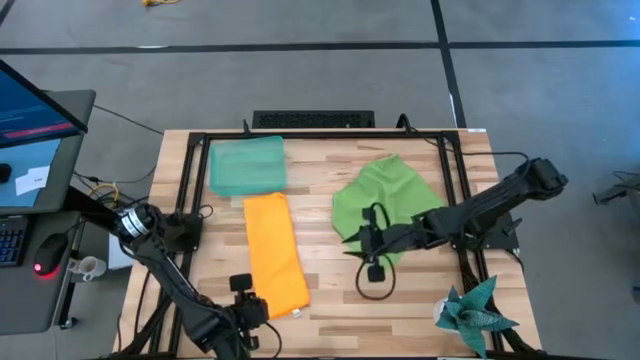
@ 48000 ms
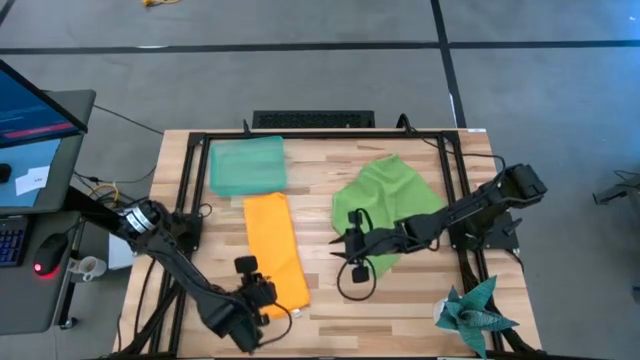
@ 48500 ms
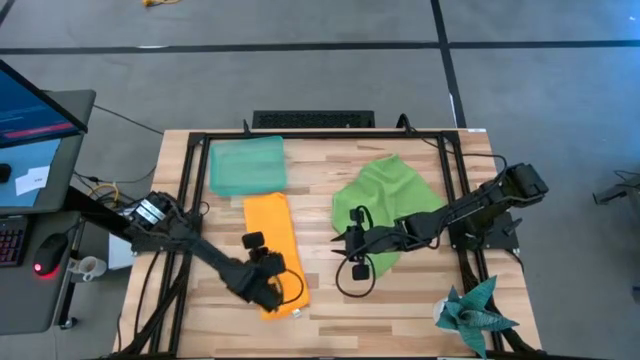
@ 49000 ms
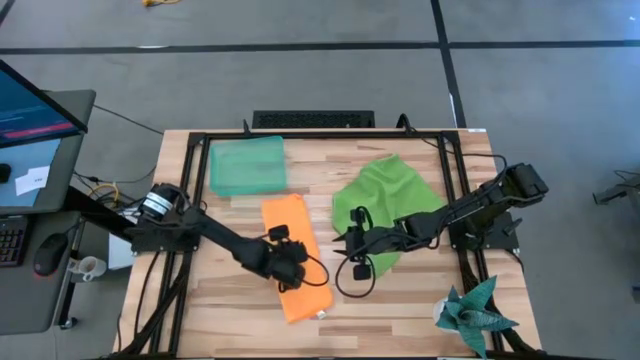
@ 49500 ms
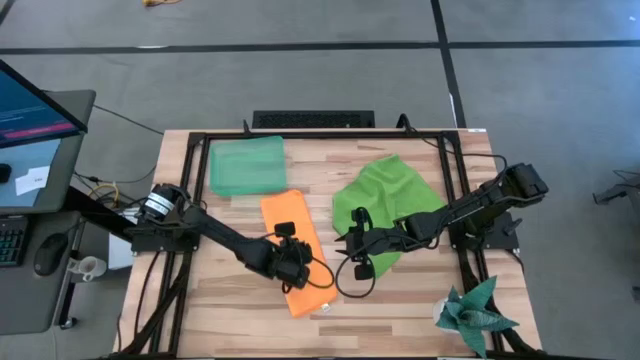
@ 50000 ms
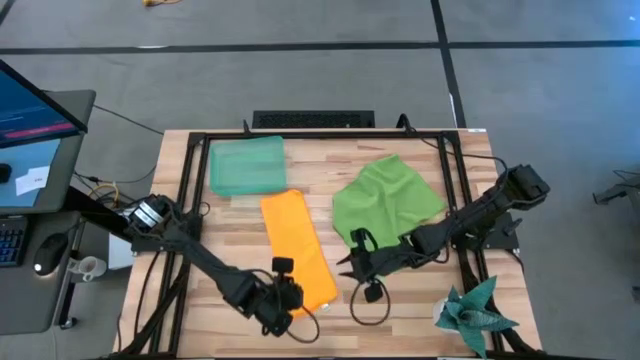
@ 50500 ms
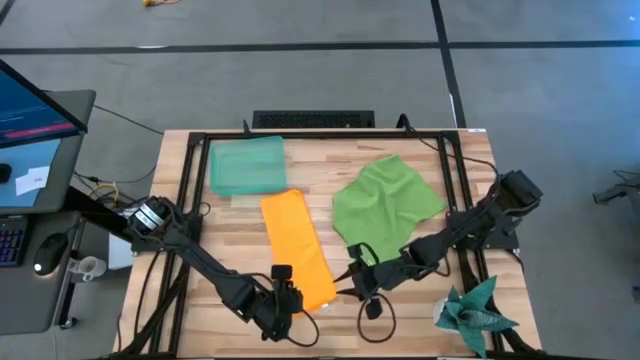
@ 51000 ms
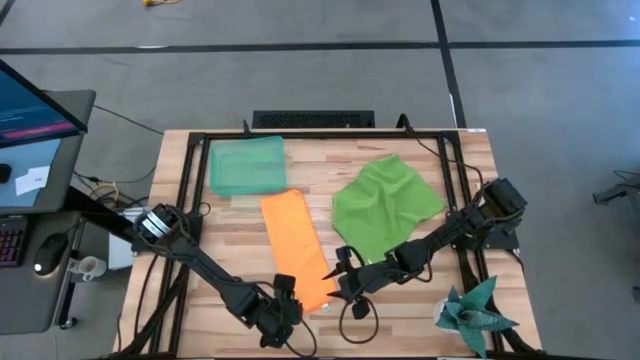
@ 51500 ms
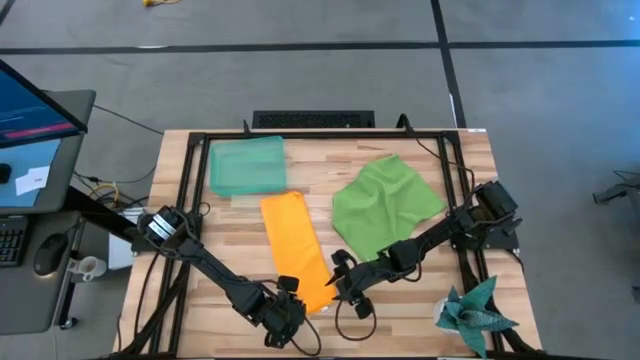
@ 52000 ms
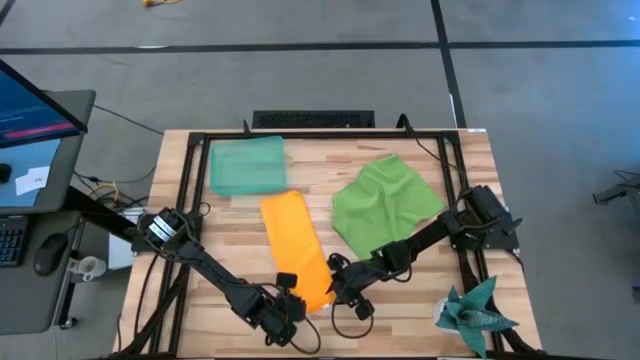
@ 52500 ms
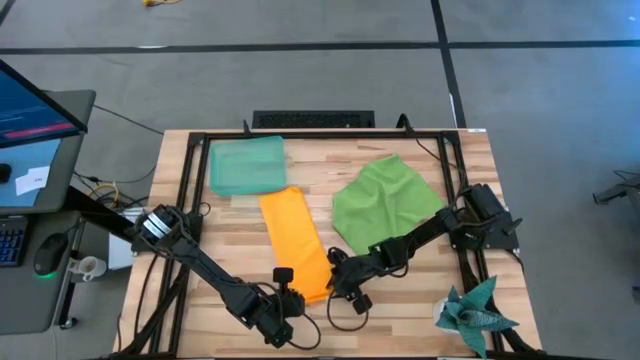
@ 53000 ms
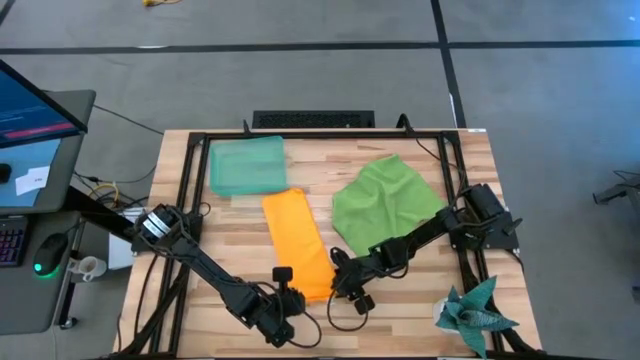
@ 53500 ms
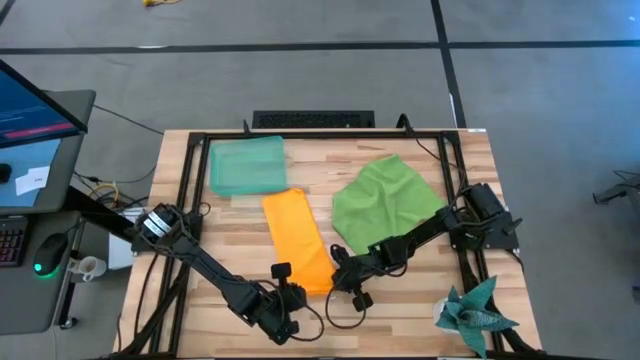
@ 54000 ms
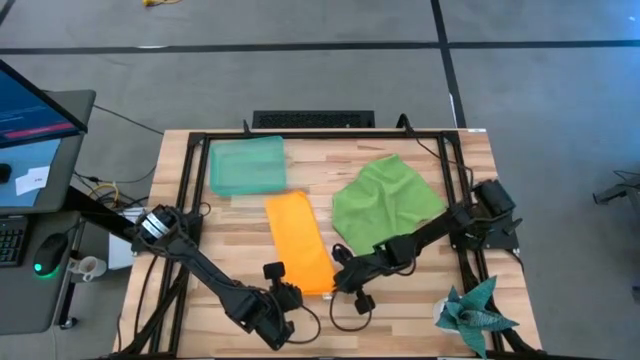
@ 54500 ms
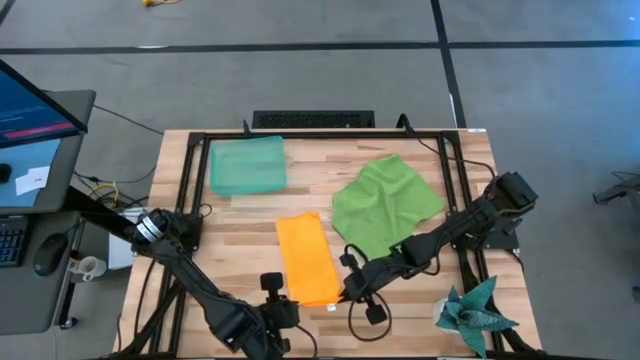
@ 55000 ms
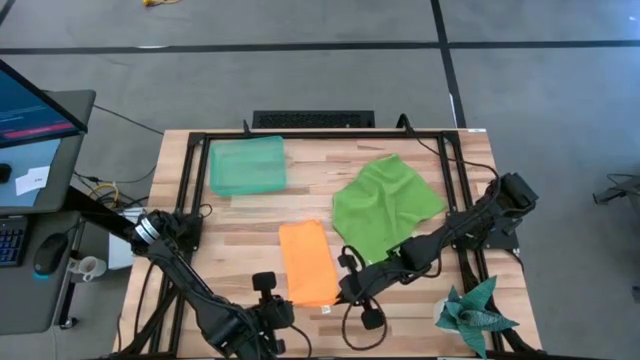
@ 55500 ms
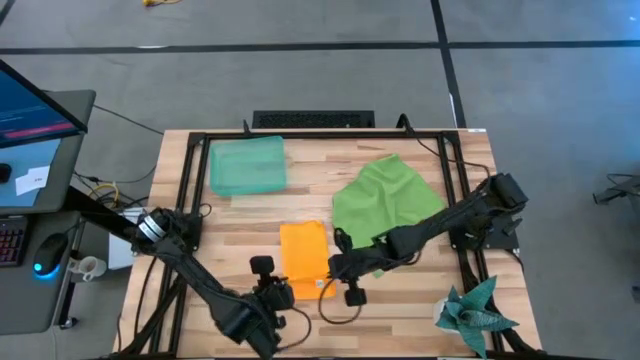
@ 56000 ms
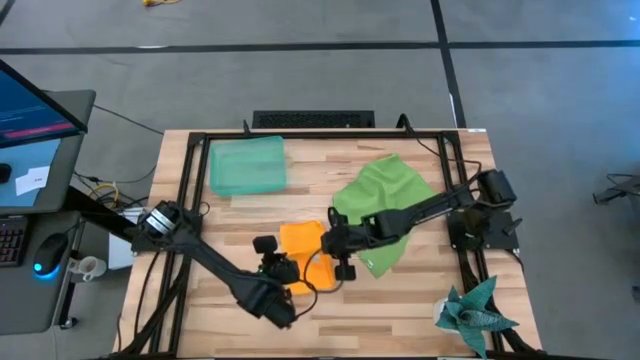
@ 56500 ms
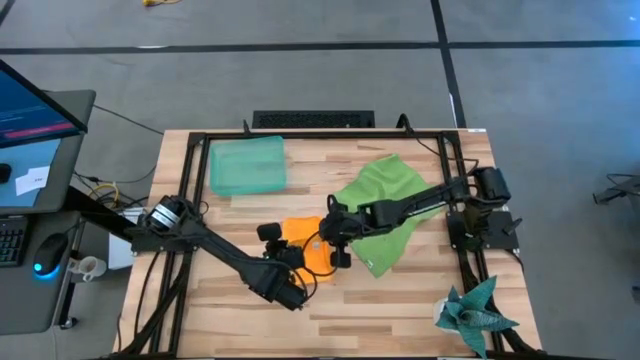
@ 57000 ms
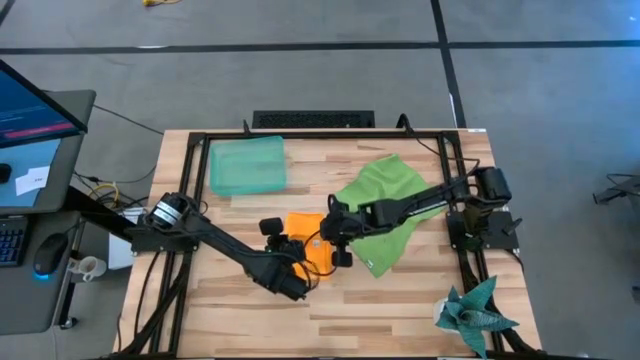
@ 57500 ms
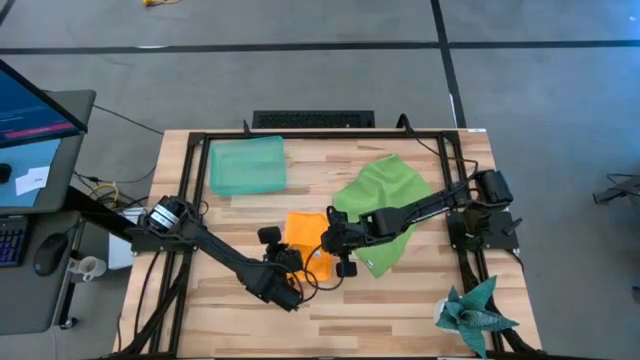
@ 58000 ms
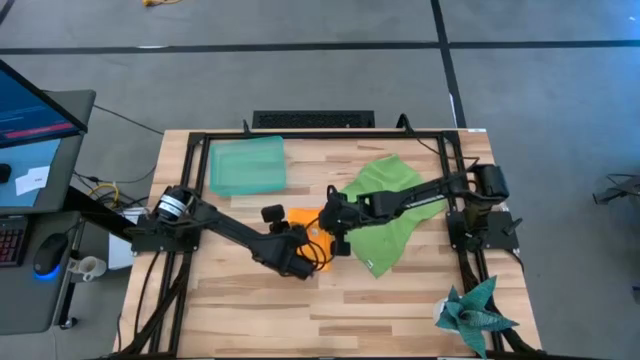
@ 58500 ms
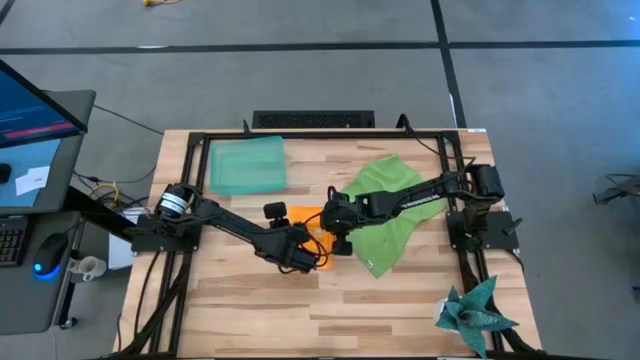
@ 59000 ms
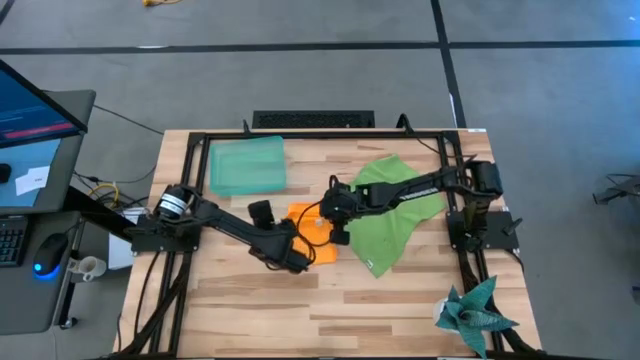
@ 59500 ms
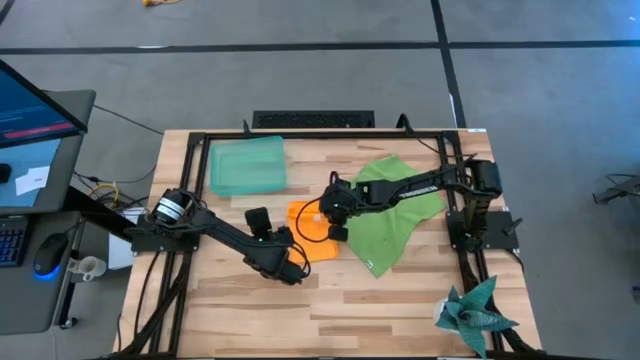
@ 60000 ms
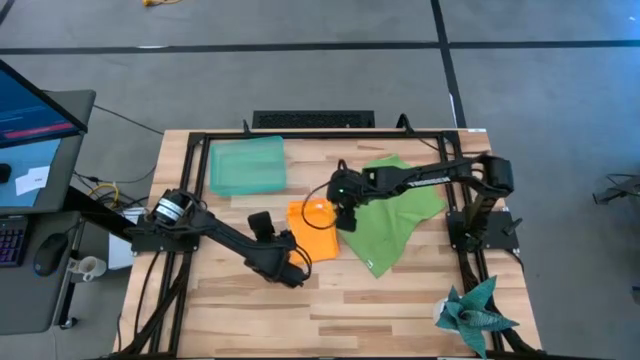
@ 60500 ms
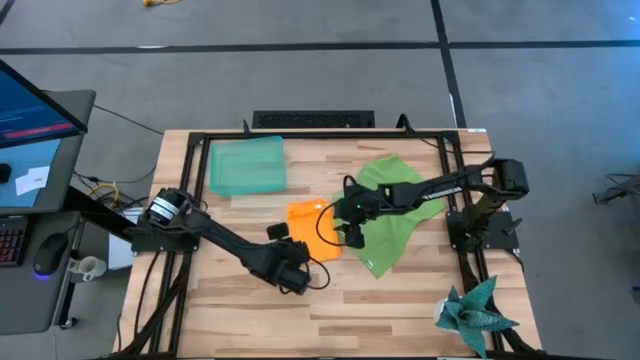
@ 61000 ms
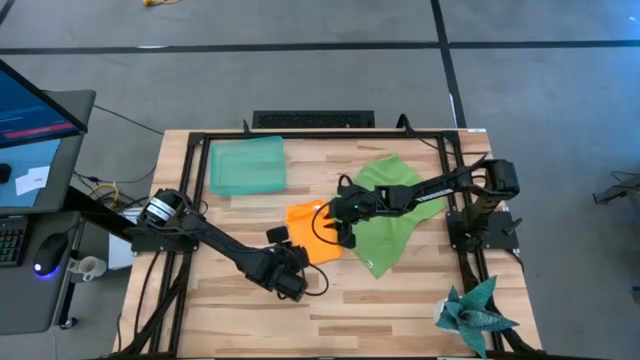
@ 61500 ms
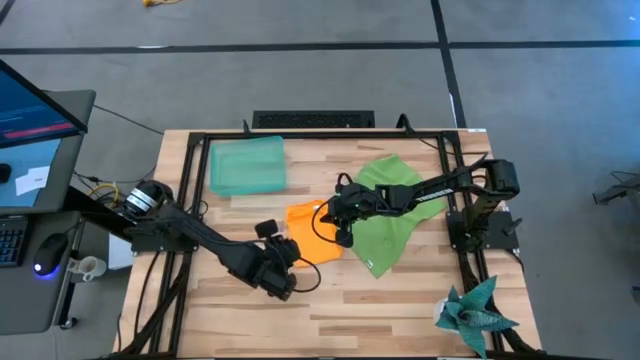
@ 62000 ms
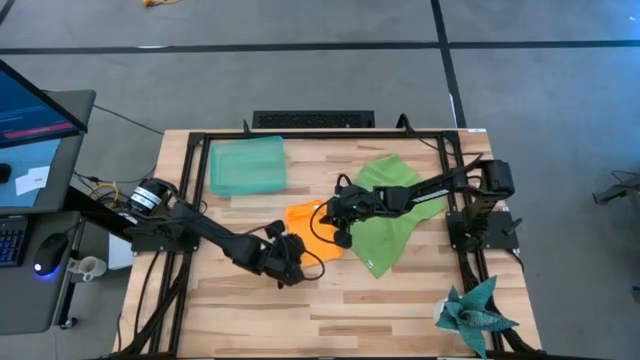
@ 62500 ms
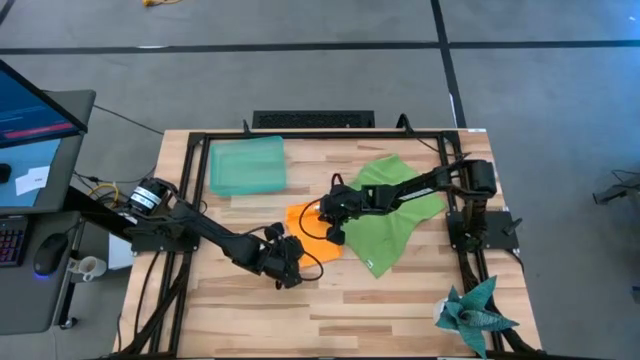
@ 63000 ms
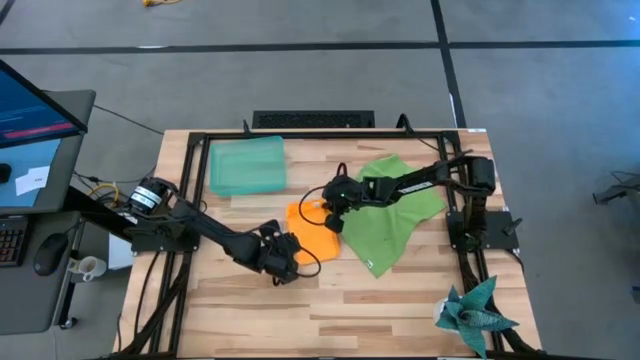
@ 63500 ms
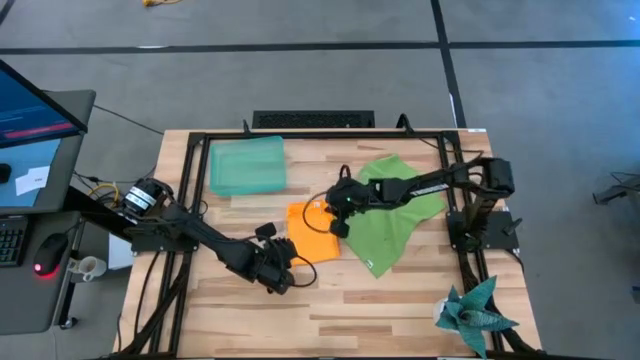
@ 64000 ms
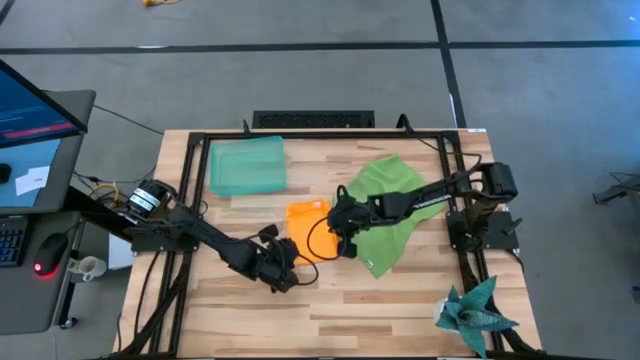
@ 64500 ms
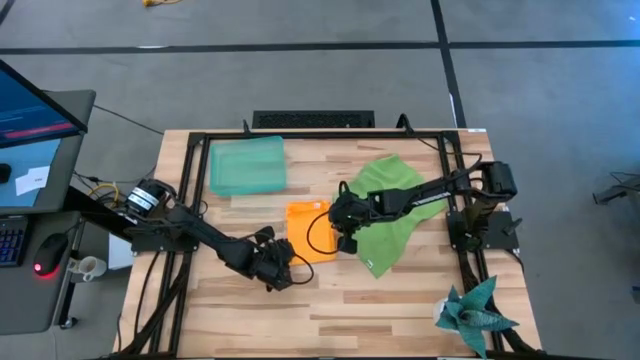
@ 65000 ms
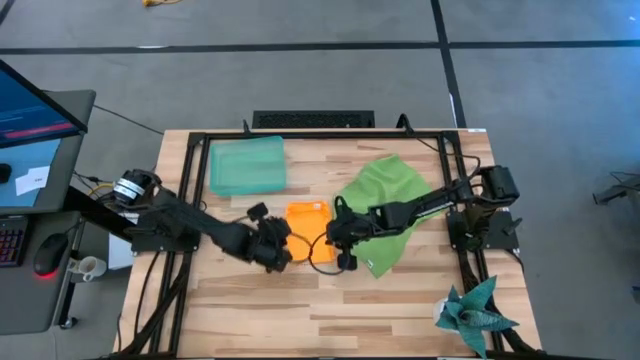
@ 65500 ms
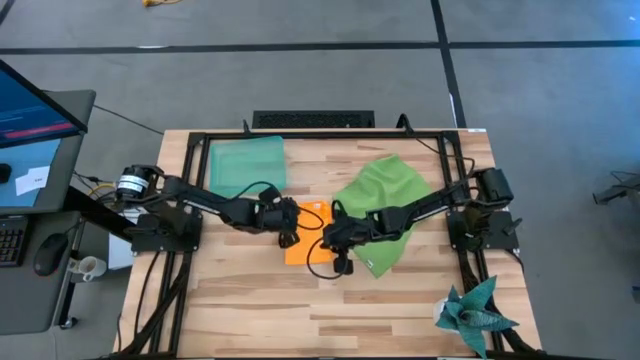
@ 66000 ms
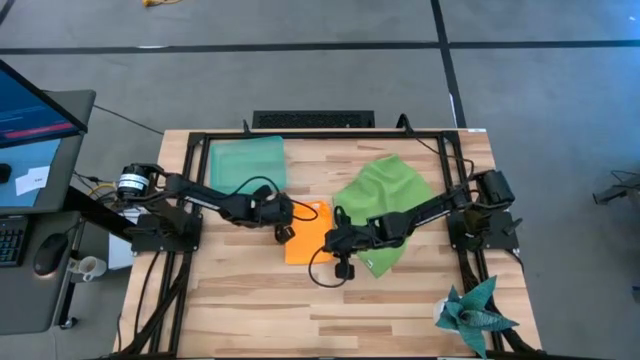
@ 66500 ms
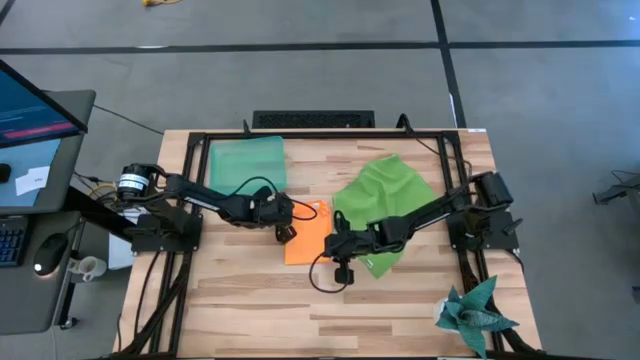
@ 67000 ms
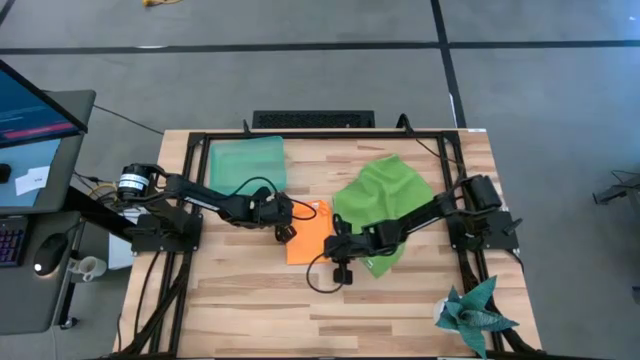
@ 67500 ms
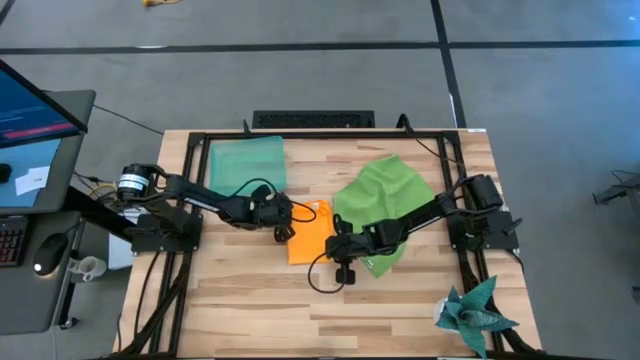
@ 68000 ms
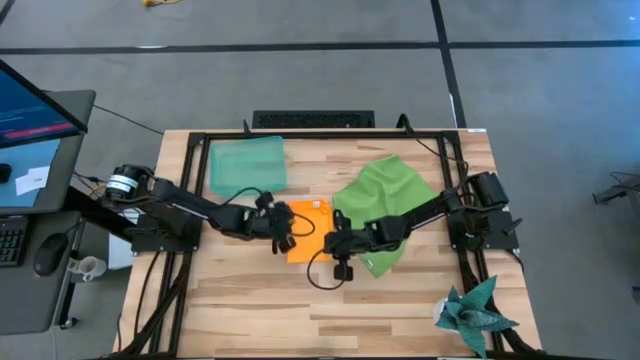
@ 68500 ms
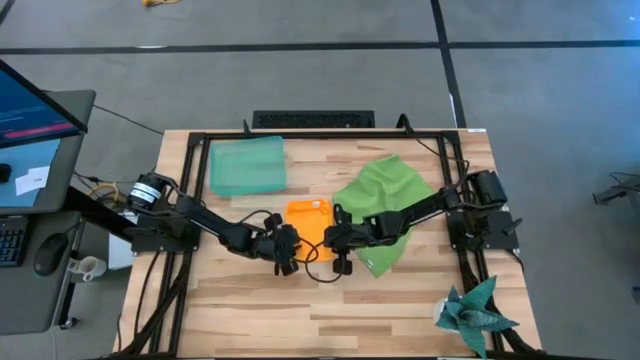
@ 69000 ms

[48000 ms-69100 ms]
Task: Roll microfiber towels into tight, uniform cylinder then place into a basket
Roll the yellow microfiber cloth
